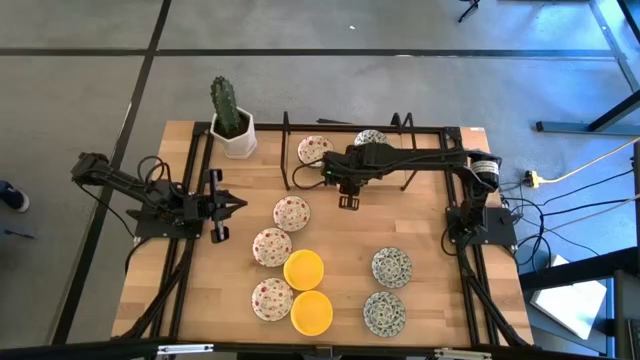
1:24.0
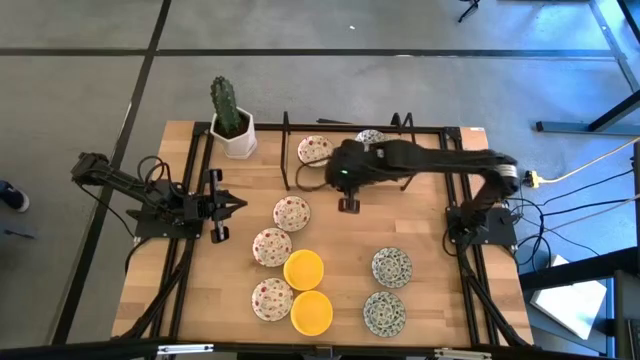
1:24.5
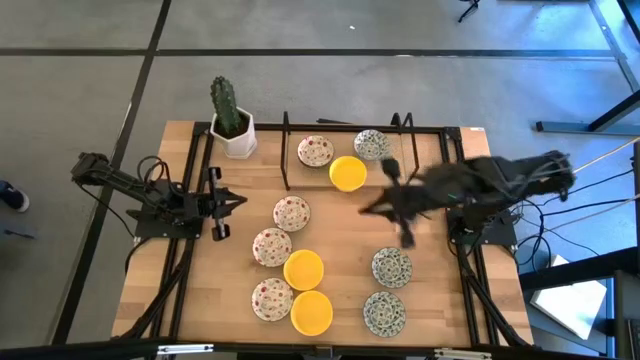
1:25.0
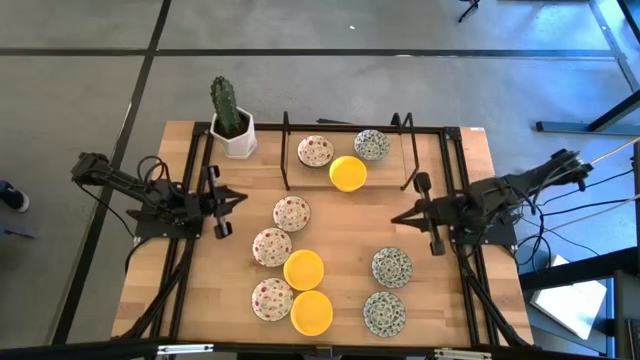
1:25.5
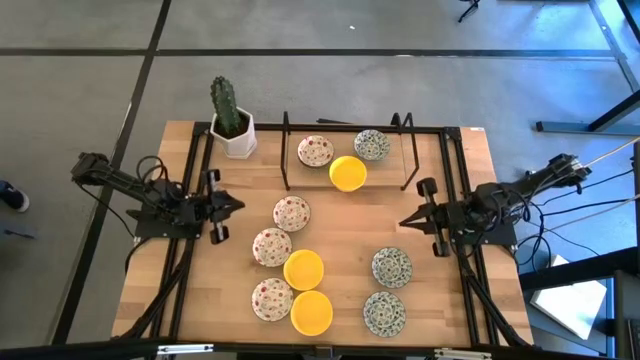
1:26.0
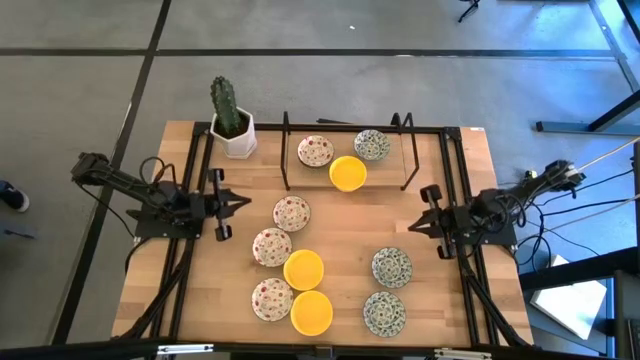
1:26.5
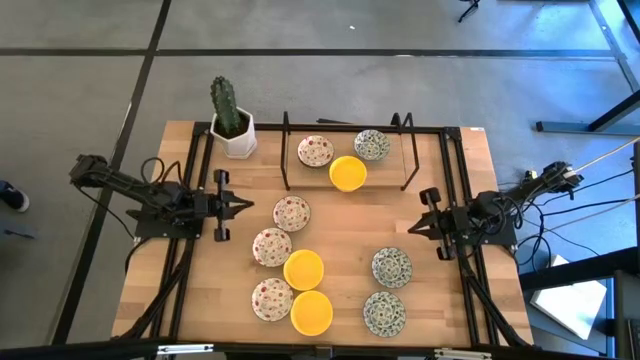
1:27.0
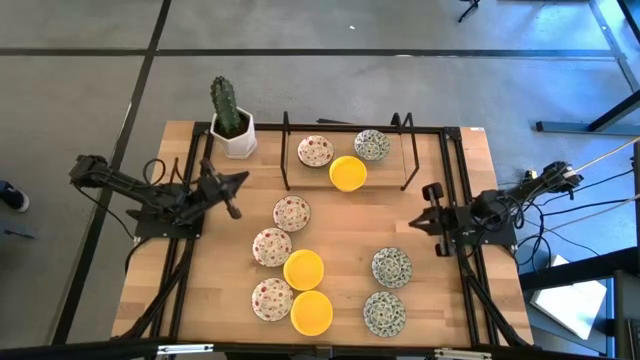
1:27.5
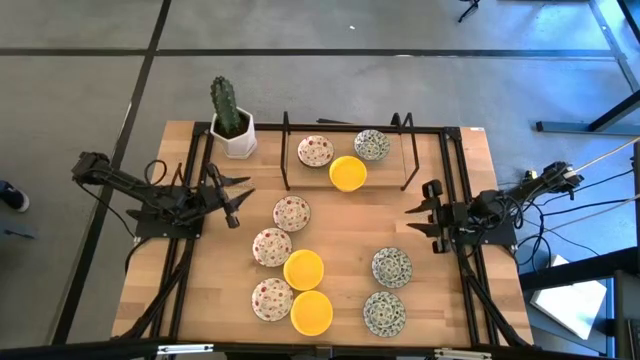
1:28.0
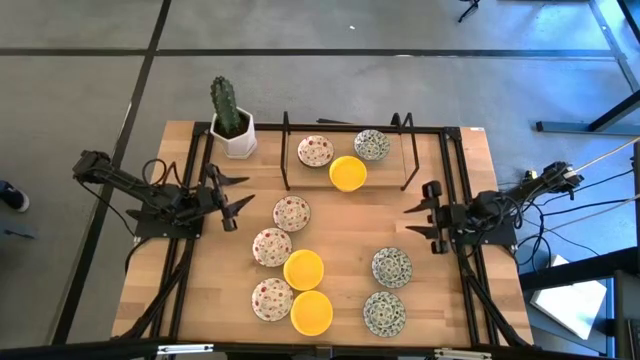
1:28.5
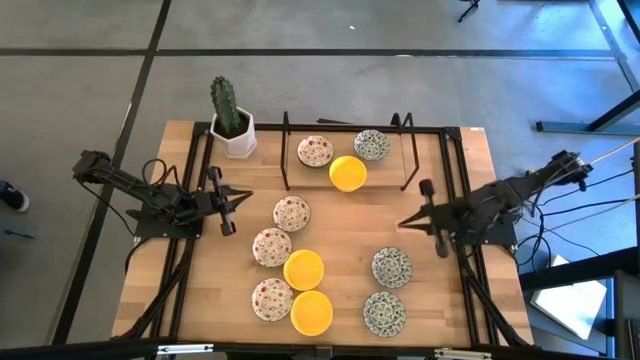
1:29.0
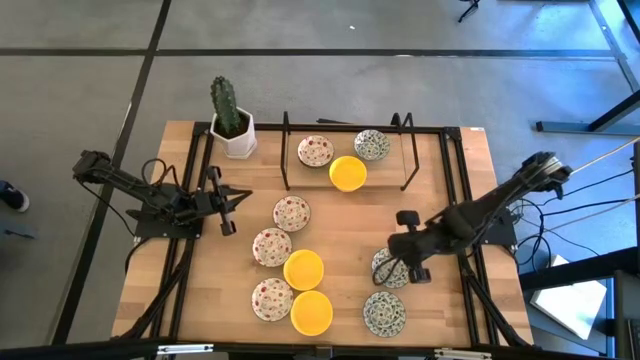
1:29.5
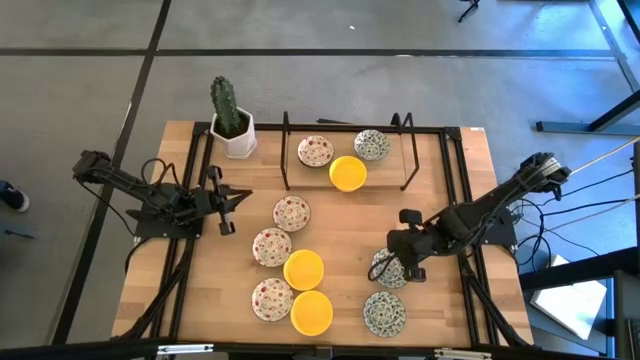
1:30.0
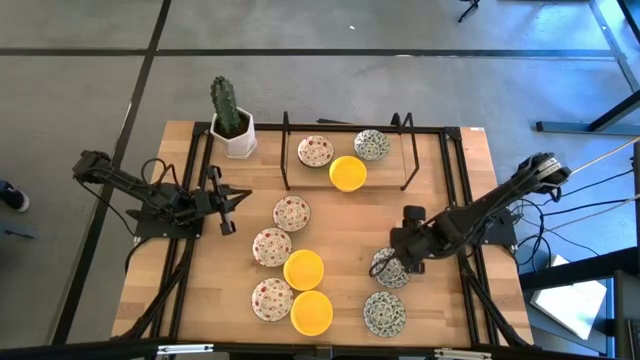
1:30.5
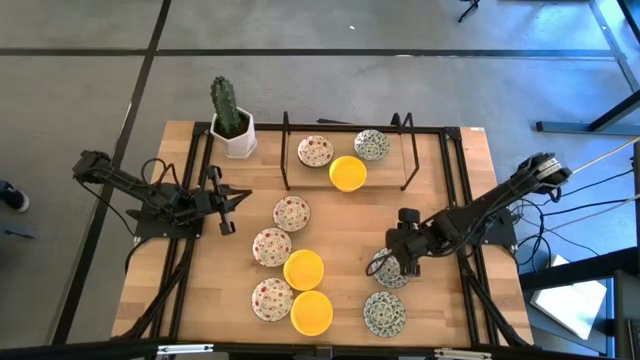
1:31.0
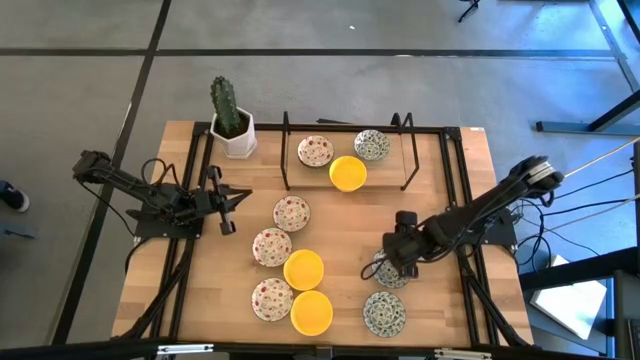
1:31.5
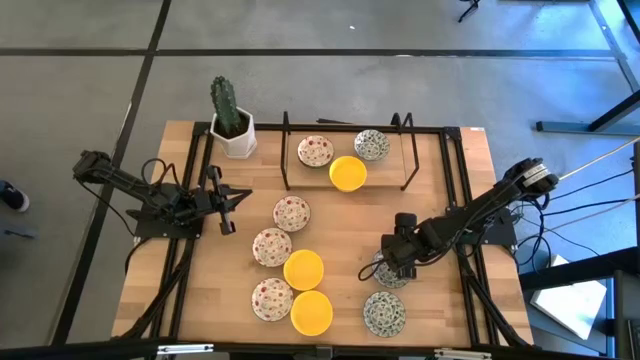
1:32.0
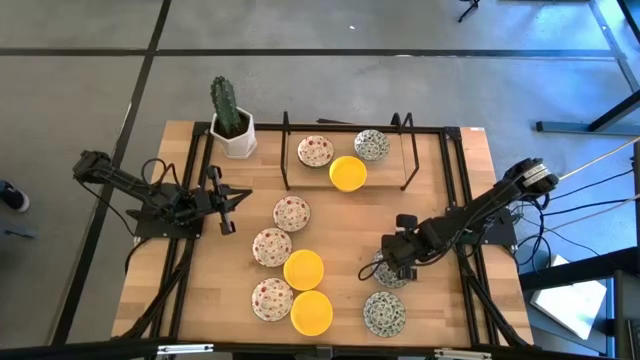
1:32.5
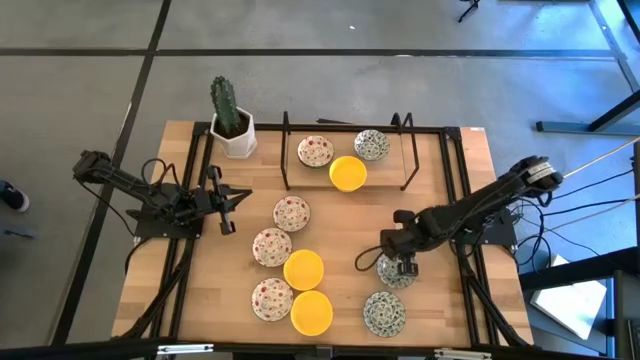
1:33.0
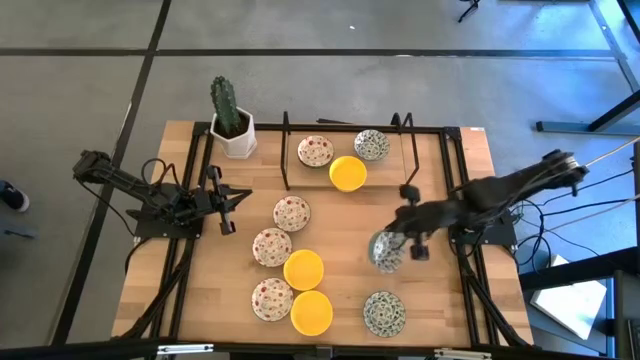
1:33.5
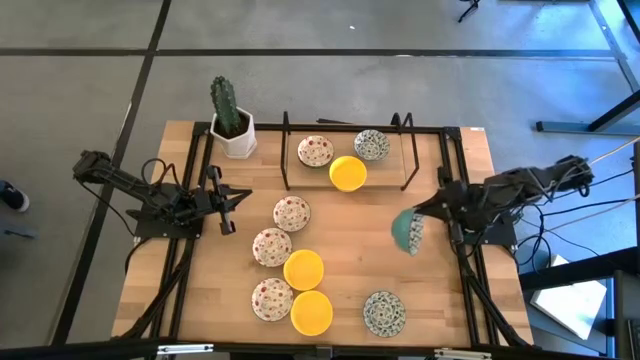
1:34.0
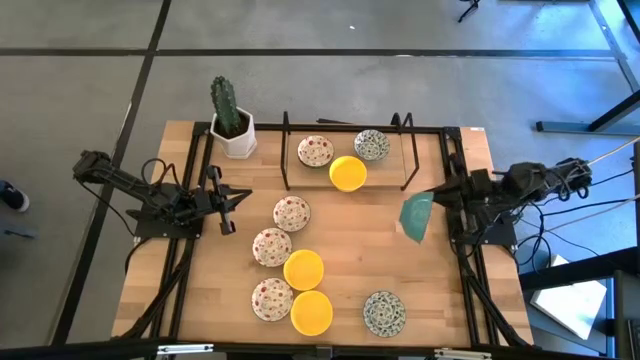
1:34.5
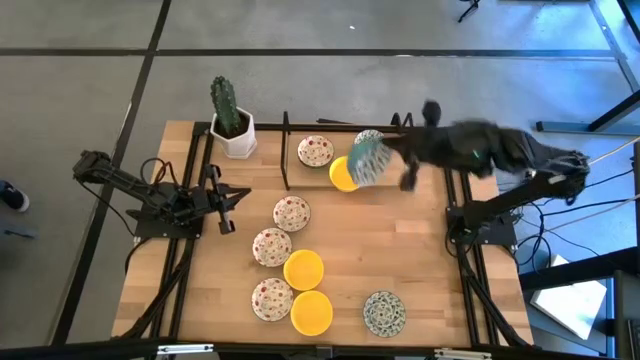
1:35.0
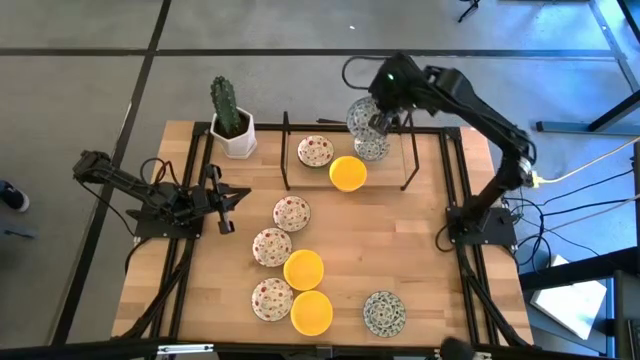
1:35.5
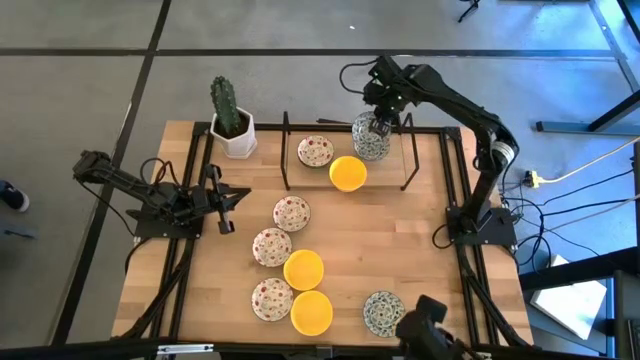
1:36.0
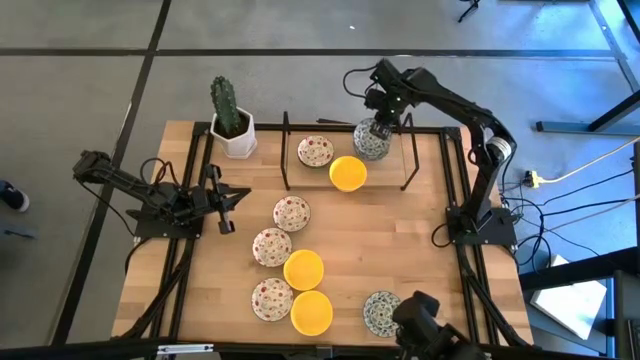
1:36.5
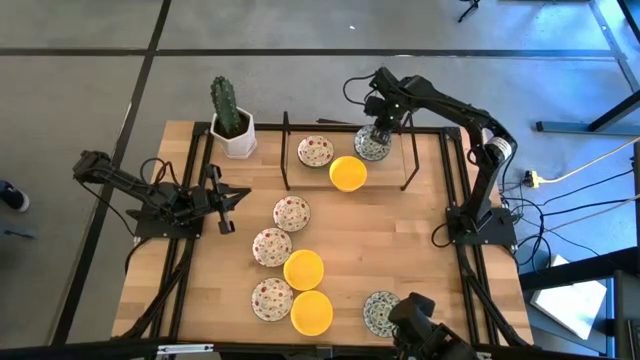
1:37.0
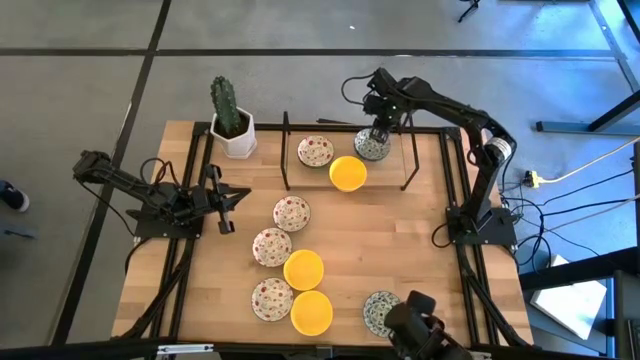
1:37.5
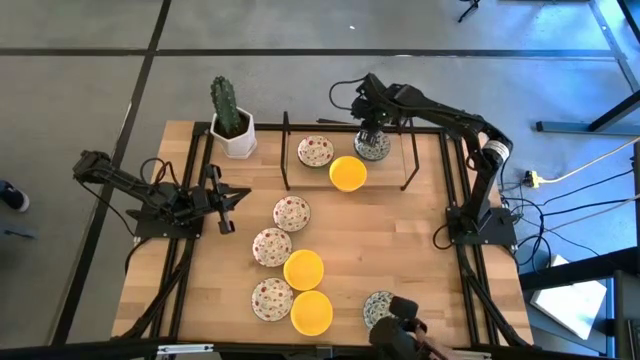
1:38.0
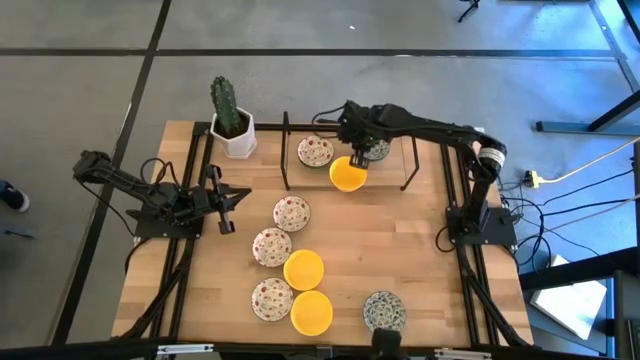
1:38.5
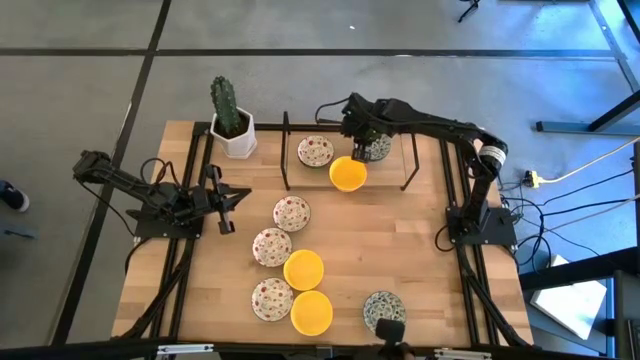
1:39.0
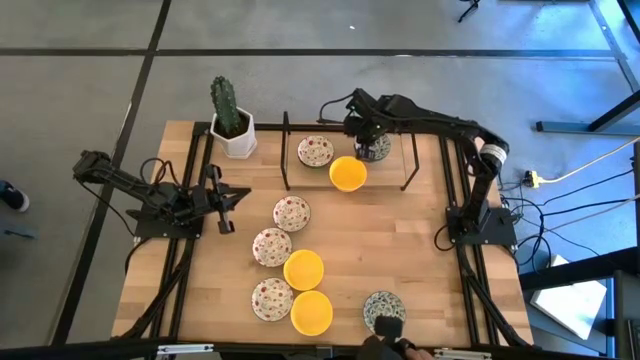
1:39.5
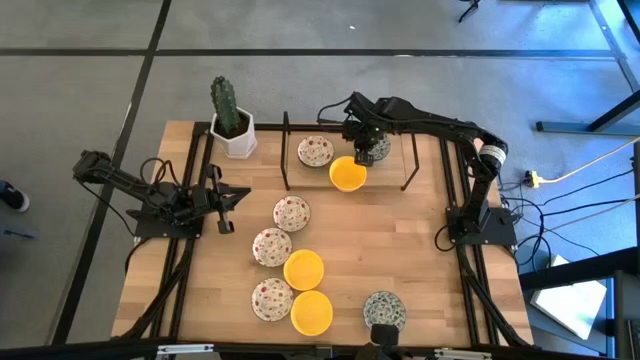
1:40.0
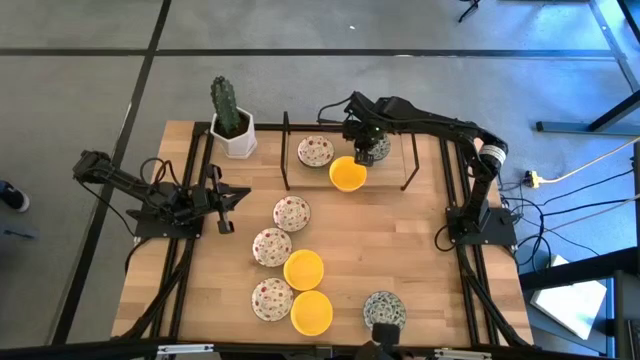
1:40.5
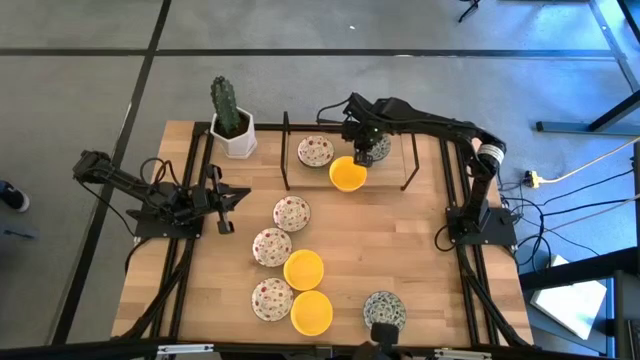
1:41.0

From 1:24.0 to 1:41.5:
Task: Pick & Place Mini bowls
Stack the blue patterned bowl on the blue patterned bowl on the shelf

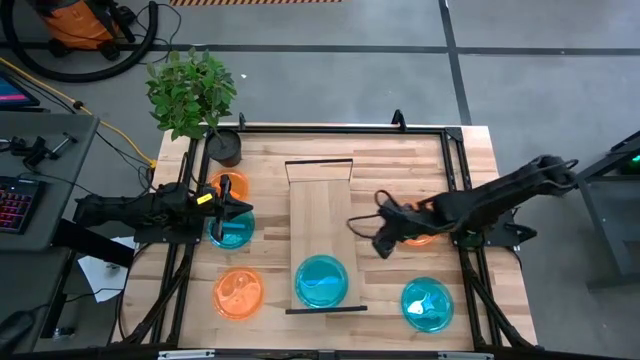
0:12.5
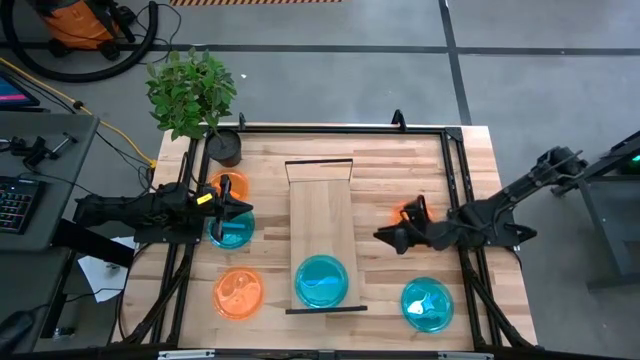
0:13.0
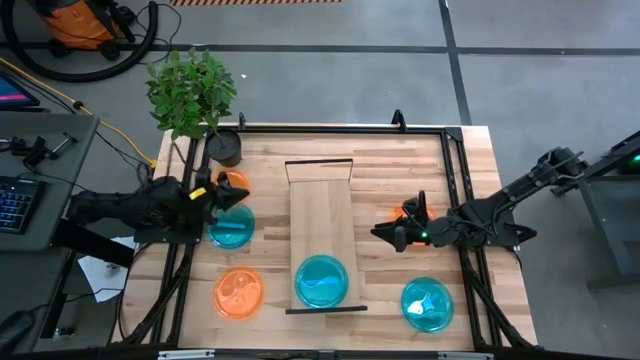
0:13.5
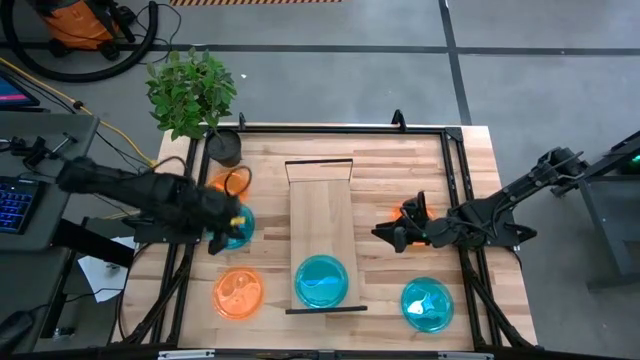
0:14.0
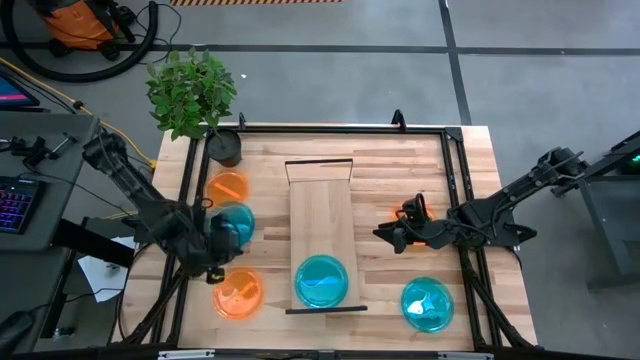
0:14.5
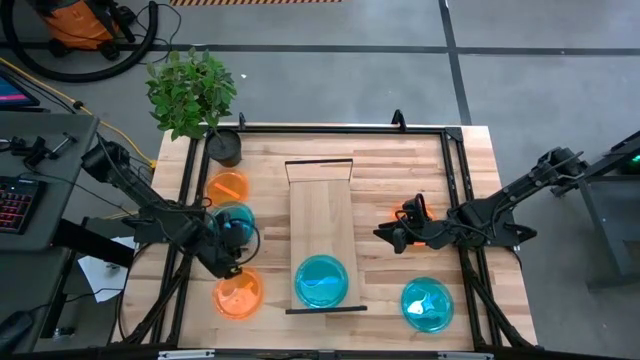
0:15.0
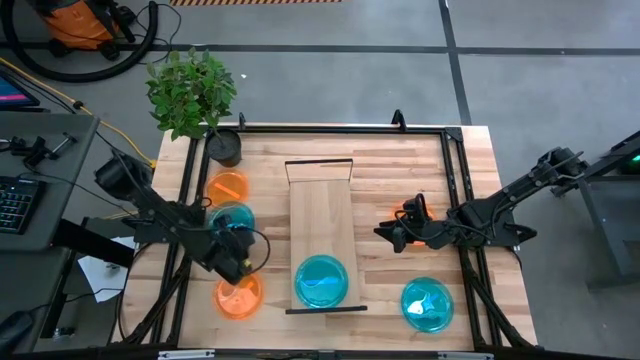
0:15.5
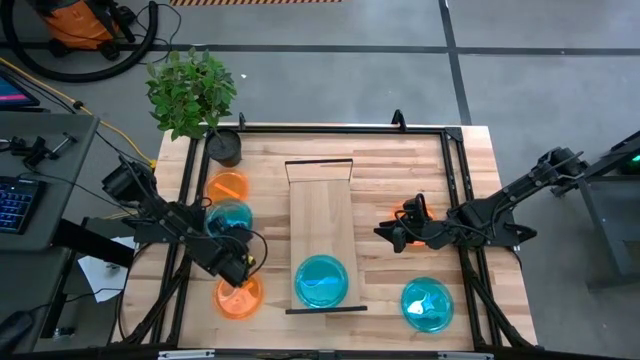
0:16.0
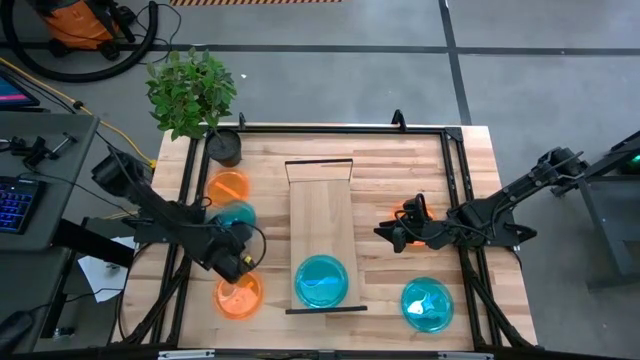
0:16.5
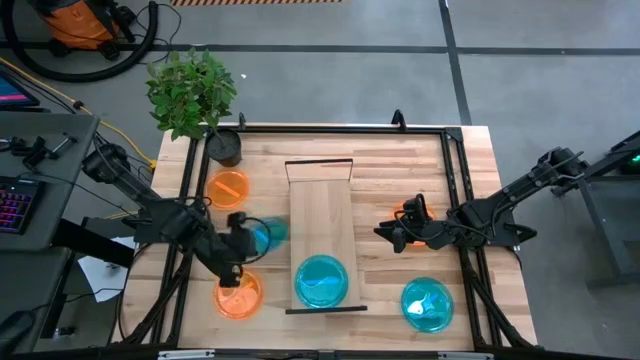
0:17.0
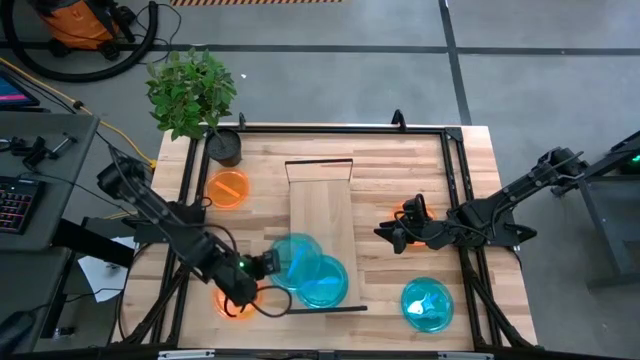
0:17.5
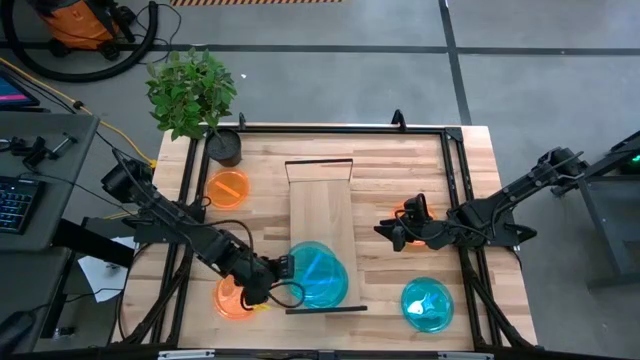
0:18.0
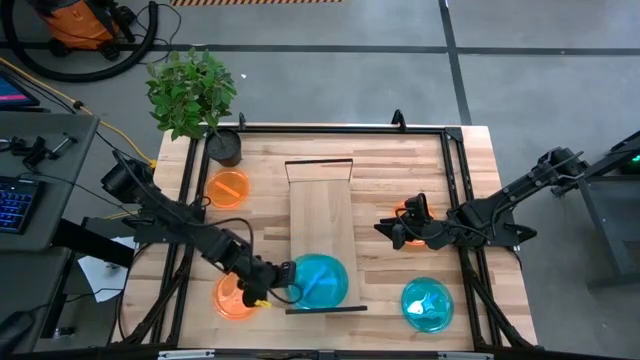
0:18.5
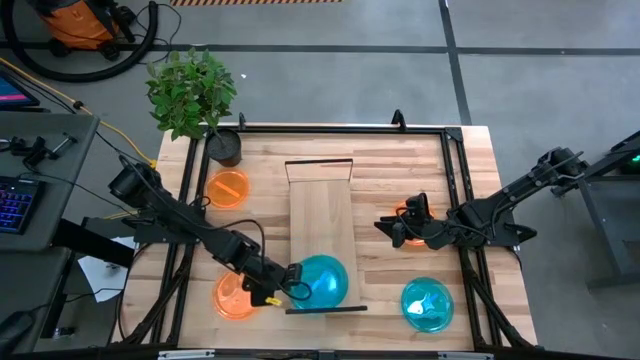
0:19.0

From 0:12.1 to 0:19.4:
Task: Place and stack plates onto a shelf
Stack the left blue transparent plate on the blue transparent plate
